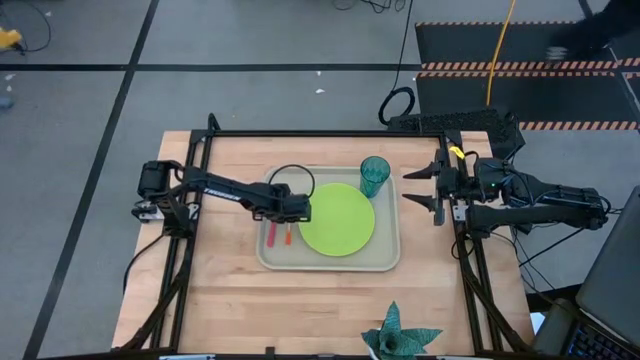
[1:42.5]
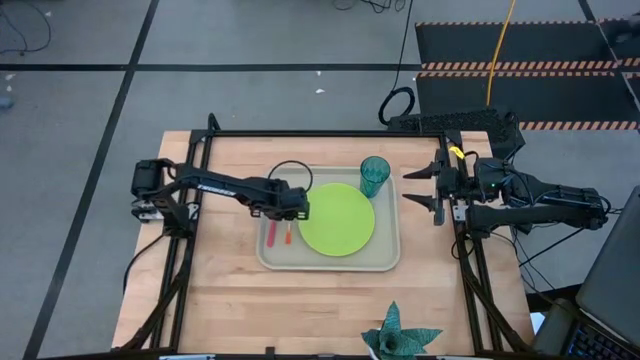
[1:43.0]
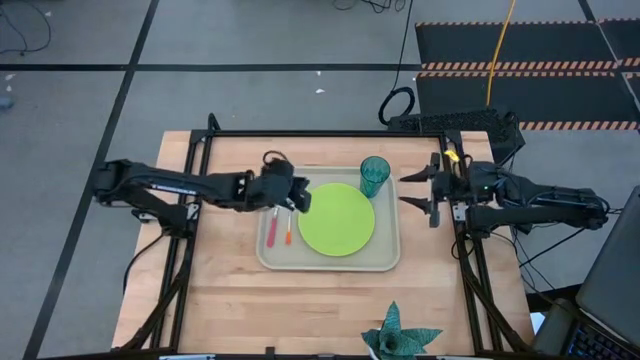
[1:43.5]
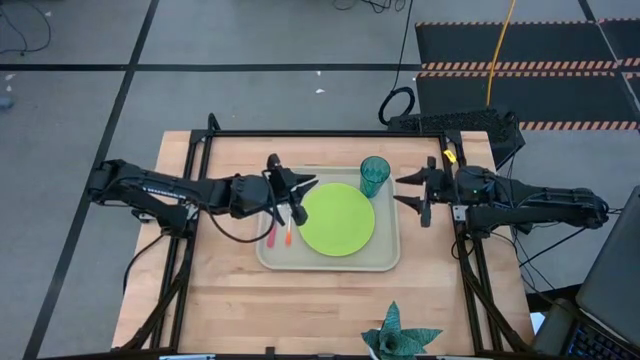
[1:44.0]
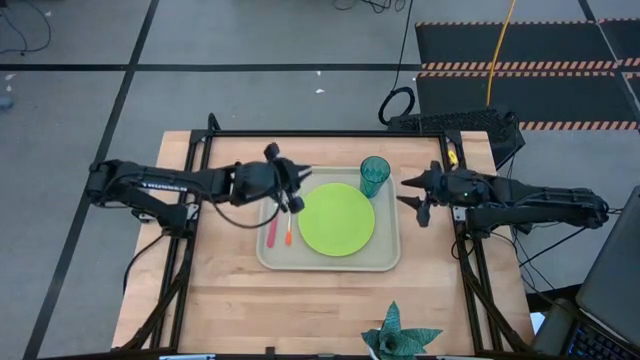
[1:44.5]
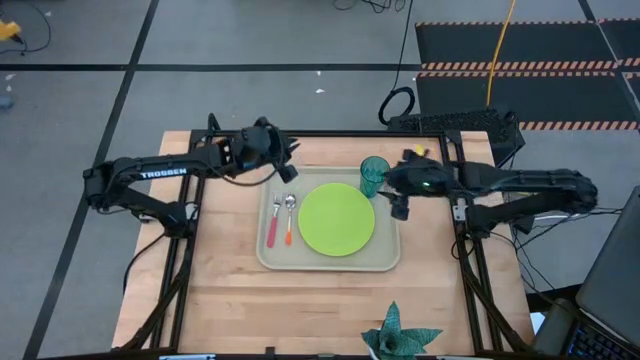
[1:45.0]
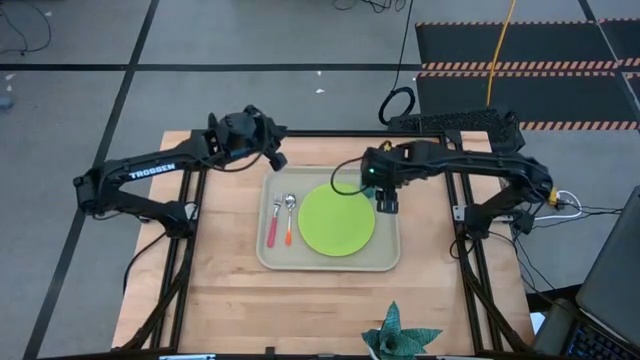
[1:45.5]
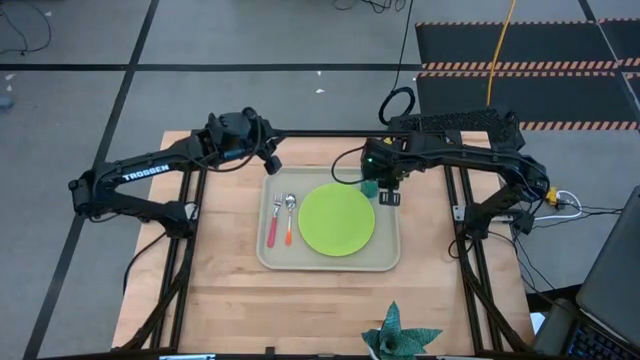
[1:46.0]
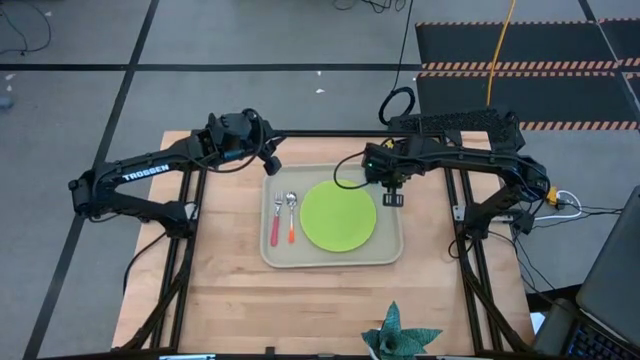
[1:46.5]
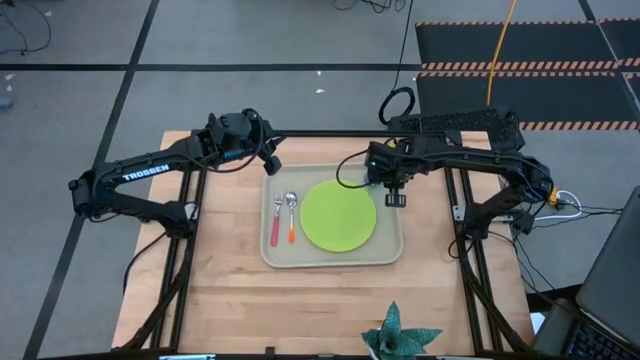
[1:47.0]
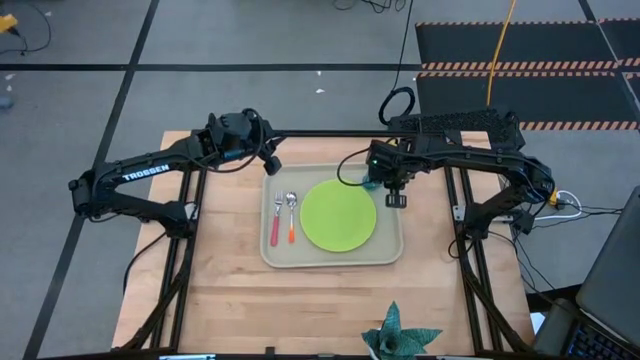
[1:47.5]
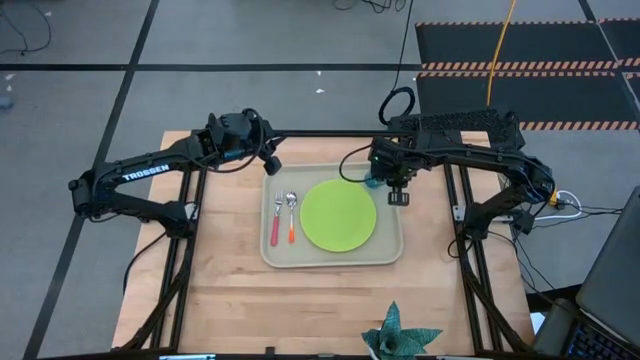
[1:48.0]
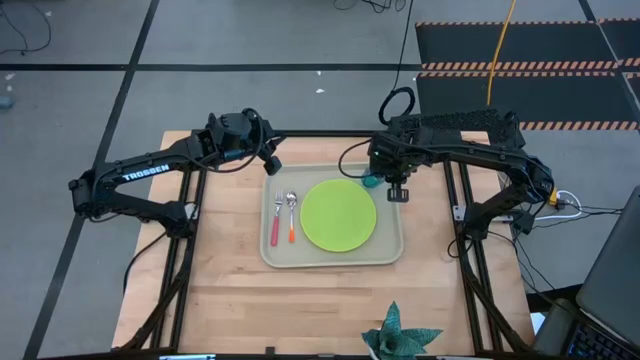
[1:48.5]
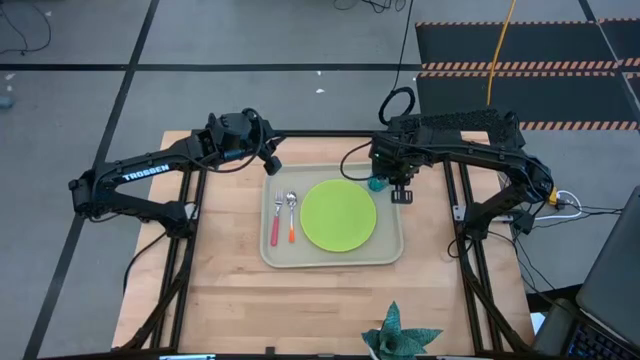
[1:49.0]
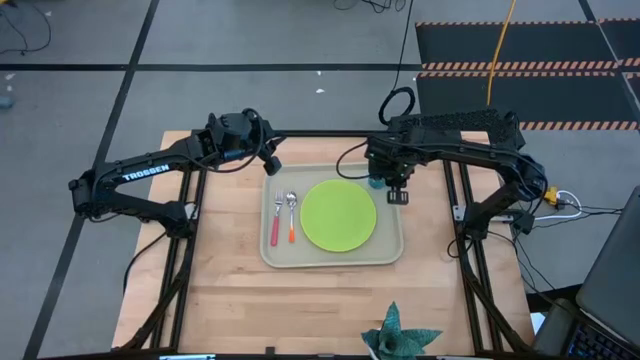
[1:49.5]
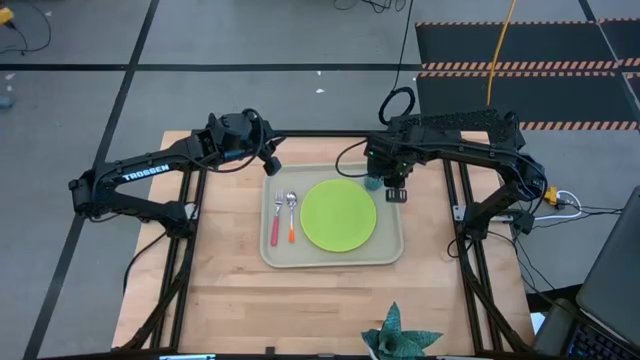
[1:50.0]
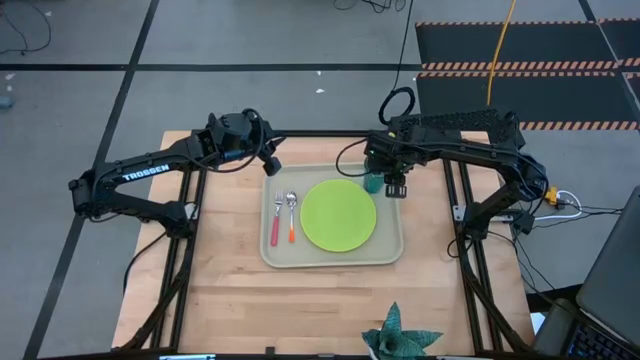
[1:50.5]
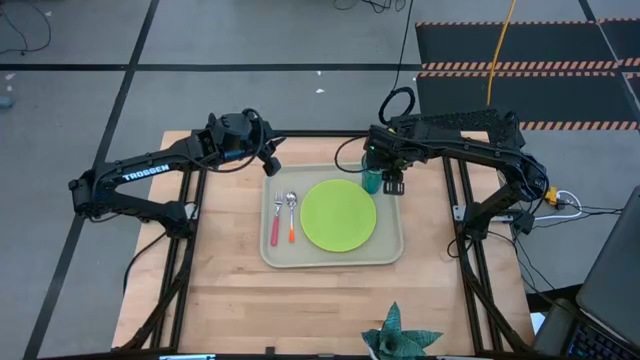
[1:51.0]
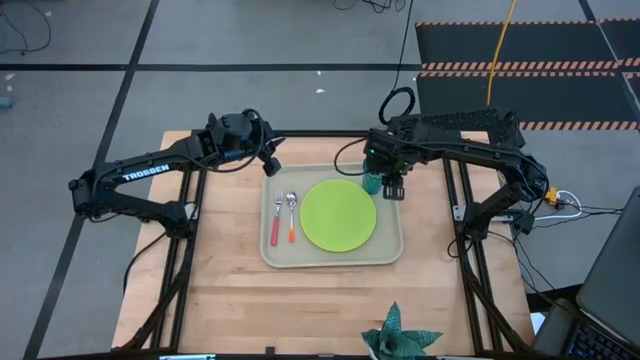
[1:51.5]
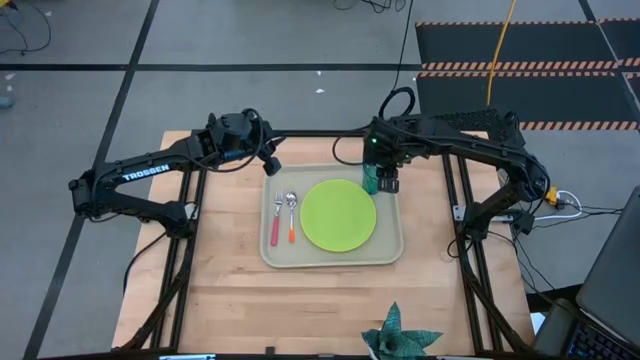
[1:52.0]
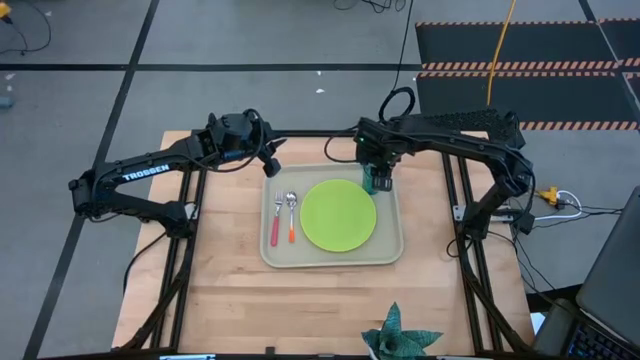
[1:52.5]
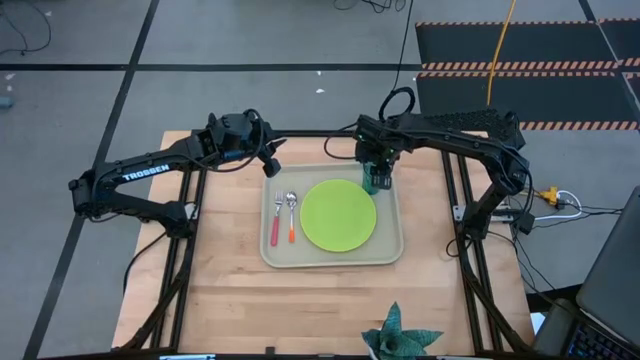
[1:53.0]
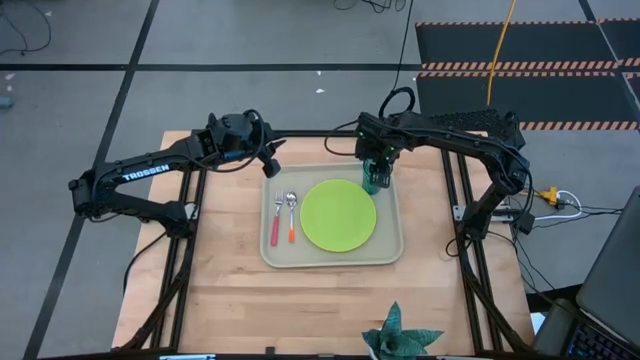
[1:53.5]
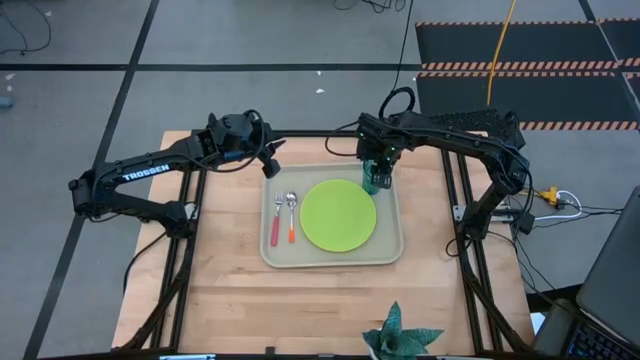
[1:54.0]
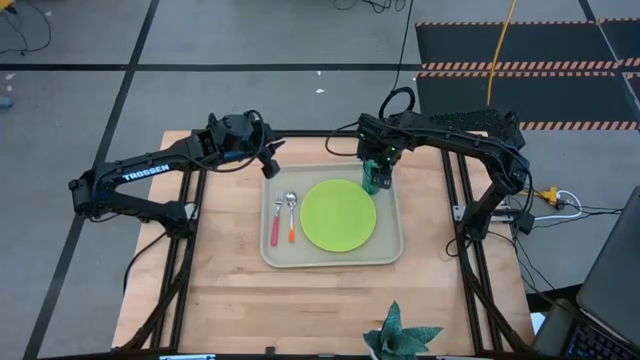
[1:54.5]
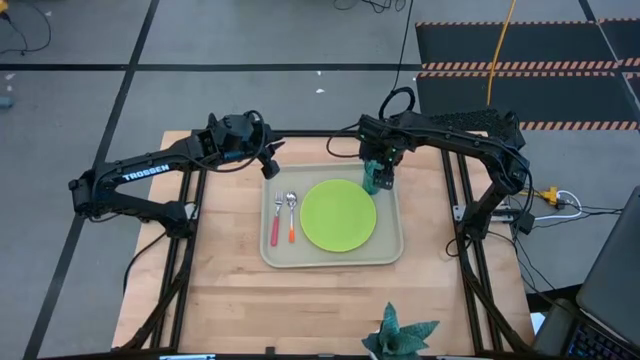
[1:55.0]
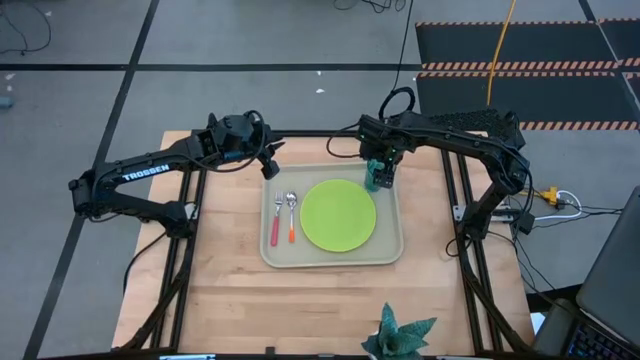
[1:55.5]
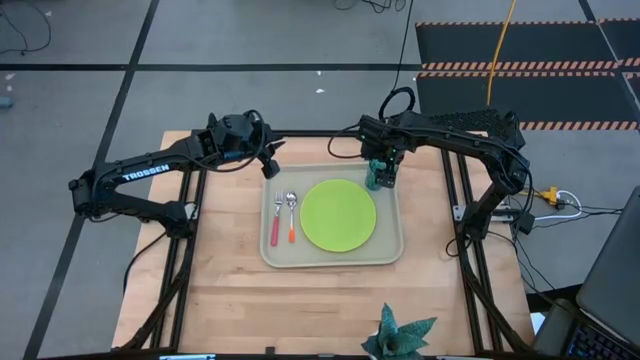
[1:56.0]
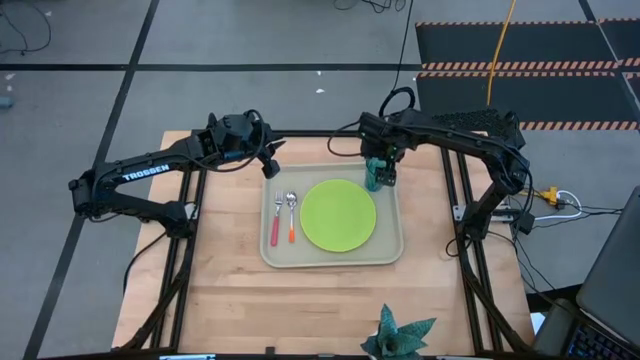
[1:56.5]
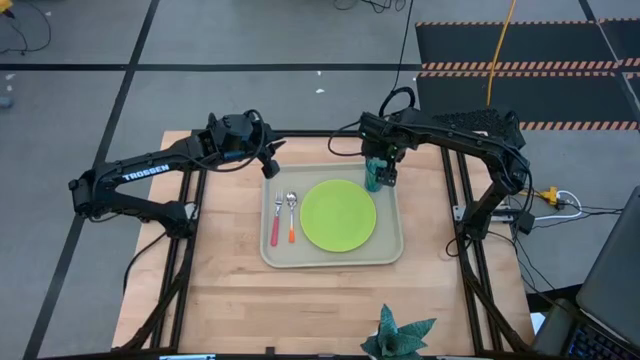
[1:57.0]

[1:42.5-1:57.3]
Task: Pick and place plate/cup/fork/spoon on tray
Adjust the blue glass

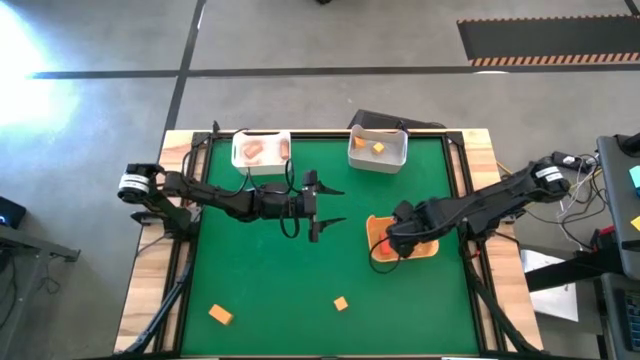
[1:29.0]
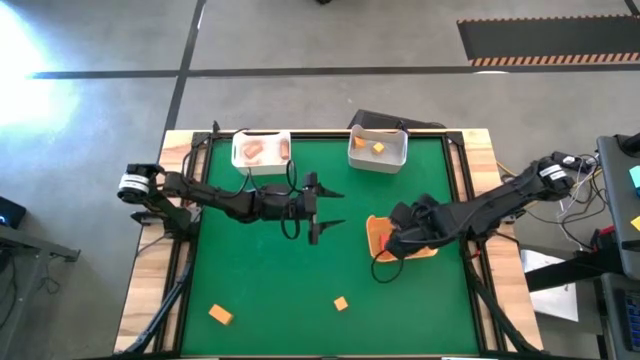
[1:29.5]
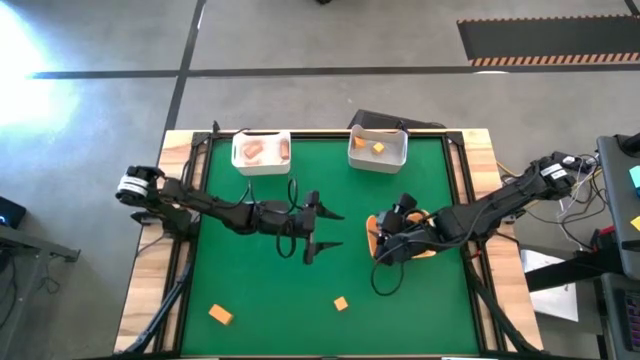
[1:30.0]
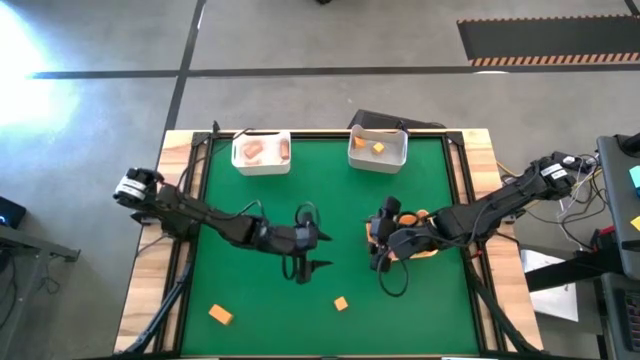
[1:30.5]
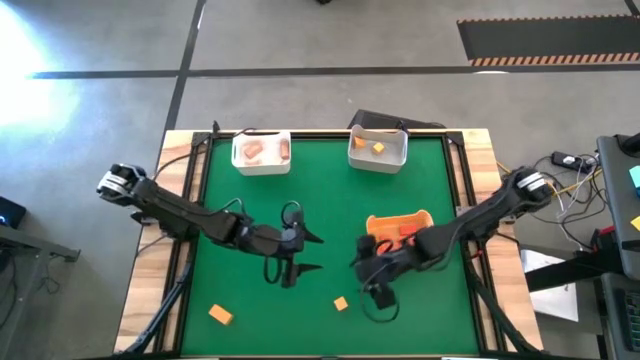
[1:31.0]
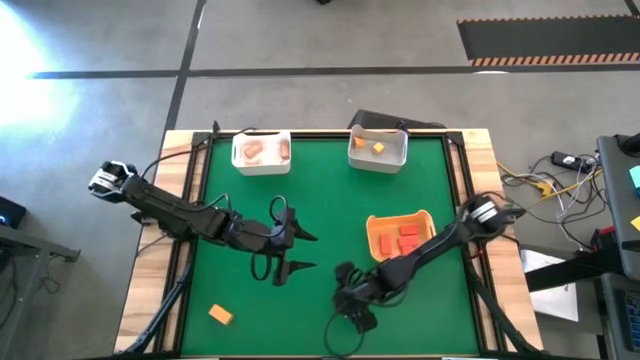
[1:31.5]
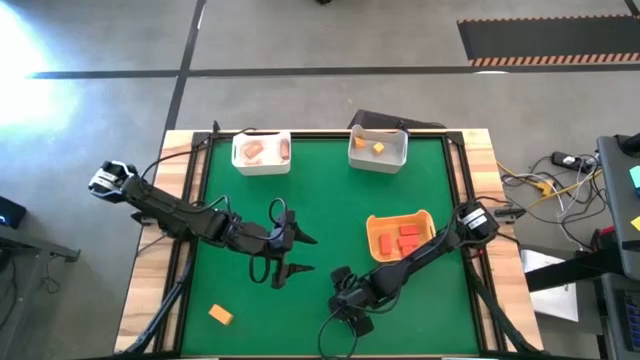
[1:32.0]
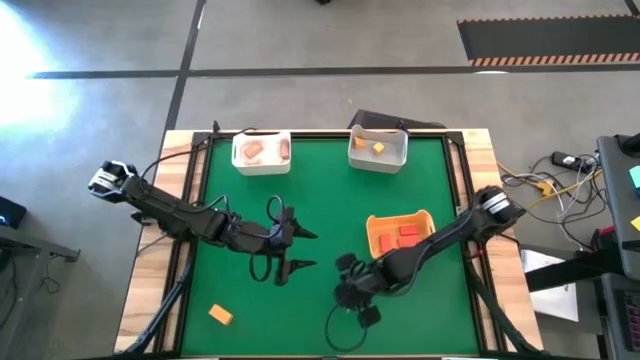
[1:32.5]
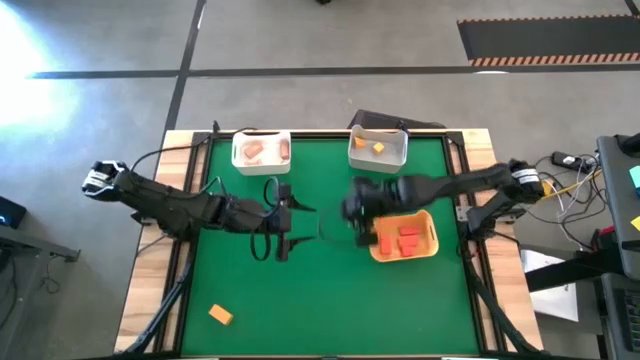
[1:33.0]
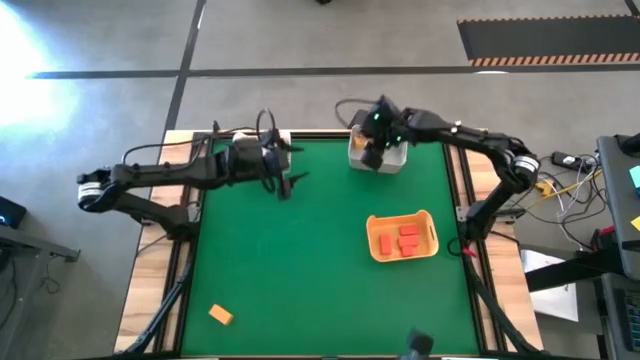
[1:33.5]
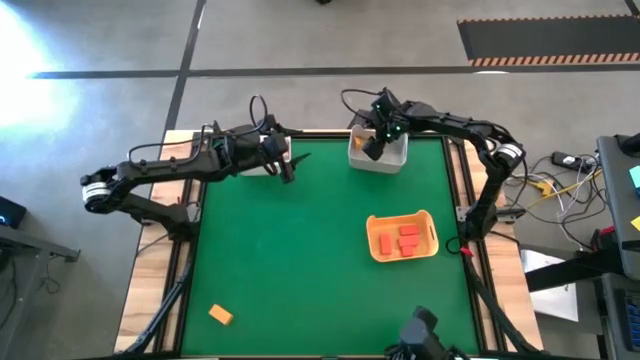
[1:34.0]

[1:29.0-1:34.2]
Task: Sort & place blocks by color
Put the yellow block into the gray bin
